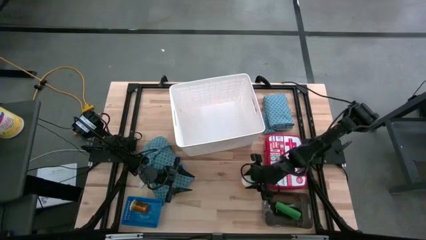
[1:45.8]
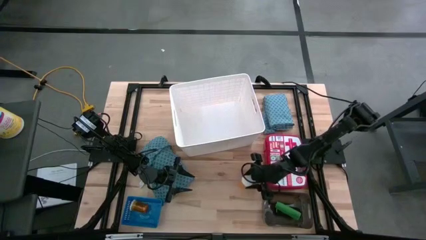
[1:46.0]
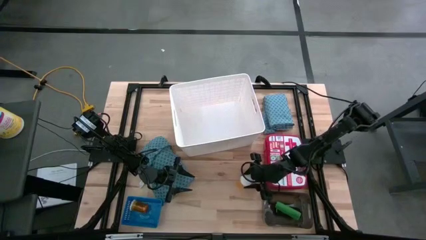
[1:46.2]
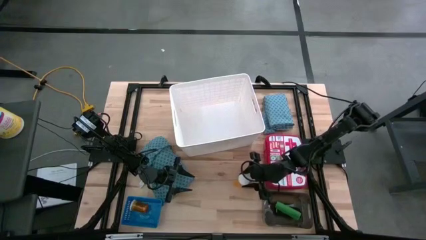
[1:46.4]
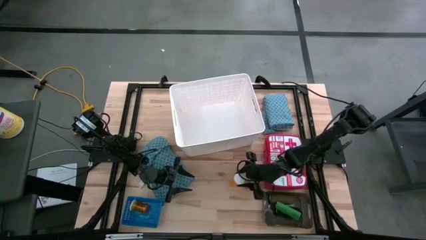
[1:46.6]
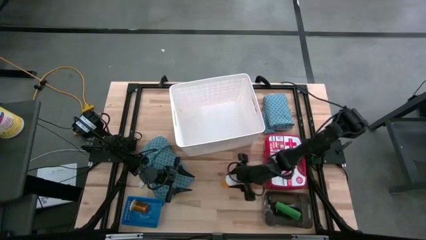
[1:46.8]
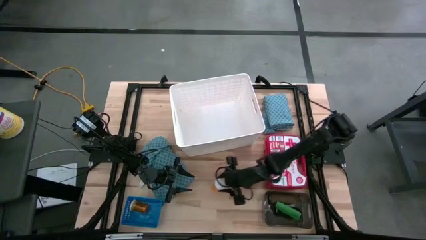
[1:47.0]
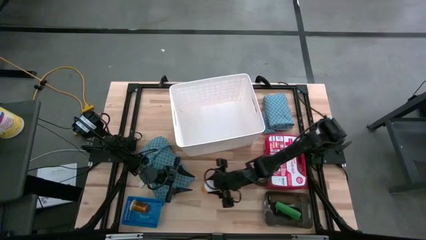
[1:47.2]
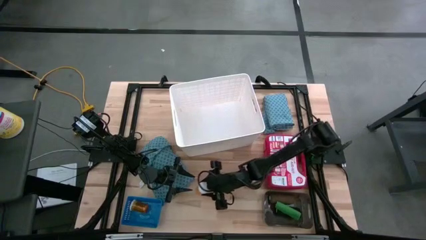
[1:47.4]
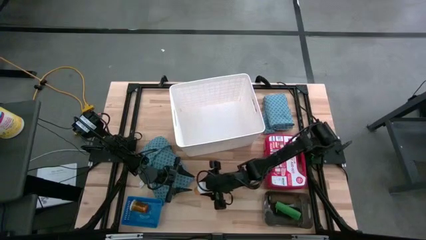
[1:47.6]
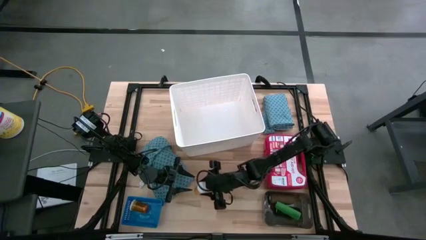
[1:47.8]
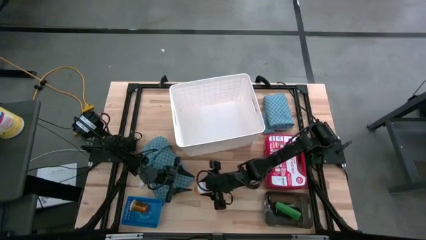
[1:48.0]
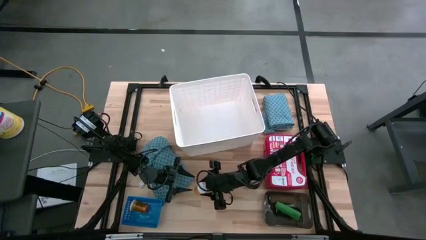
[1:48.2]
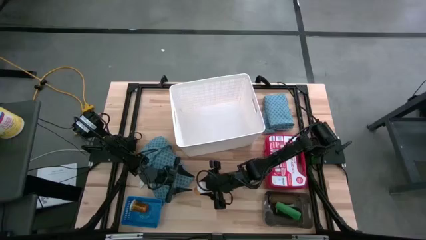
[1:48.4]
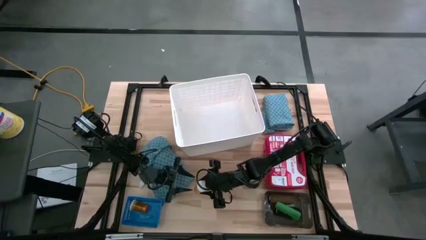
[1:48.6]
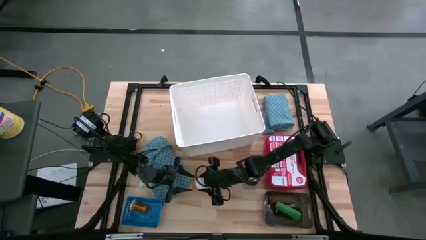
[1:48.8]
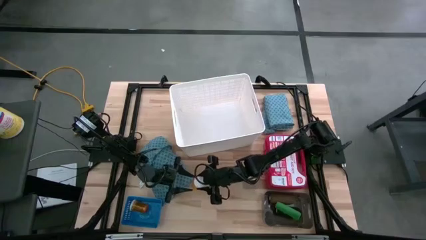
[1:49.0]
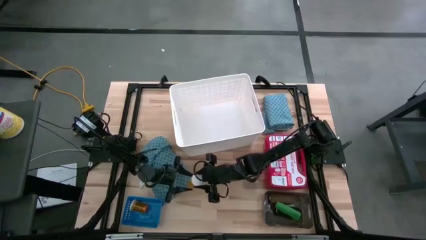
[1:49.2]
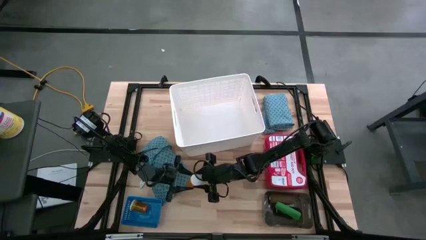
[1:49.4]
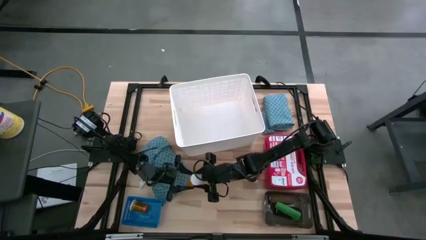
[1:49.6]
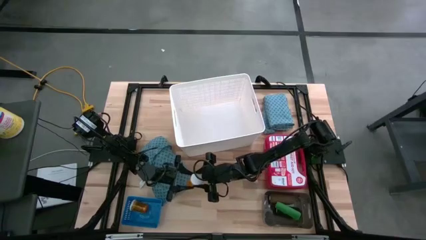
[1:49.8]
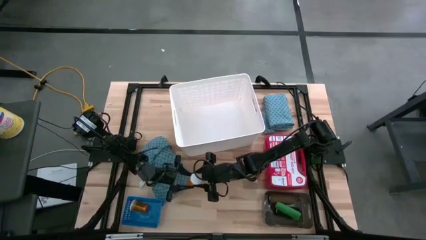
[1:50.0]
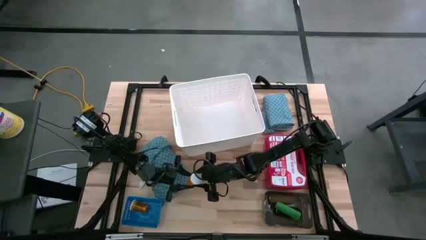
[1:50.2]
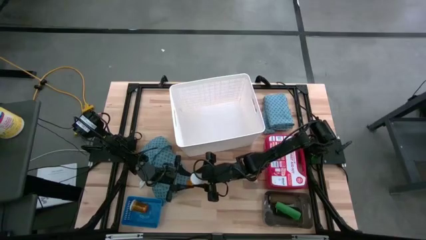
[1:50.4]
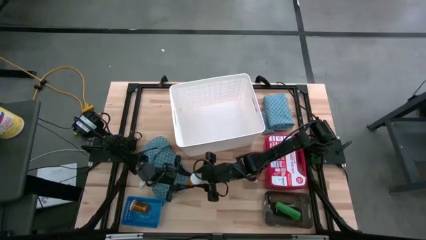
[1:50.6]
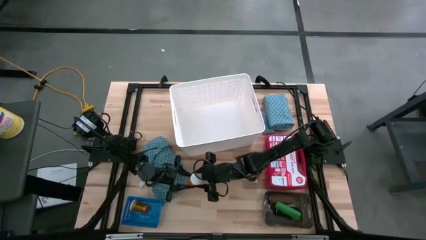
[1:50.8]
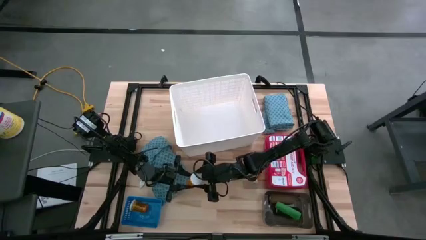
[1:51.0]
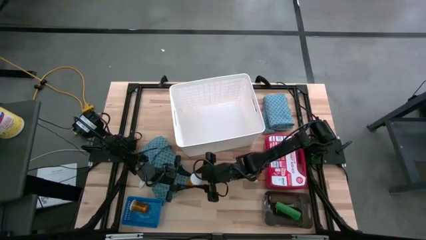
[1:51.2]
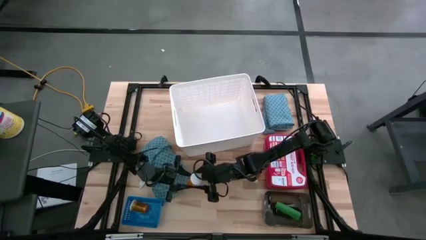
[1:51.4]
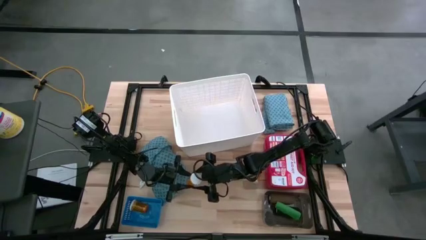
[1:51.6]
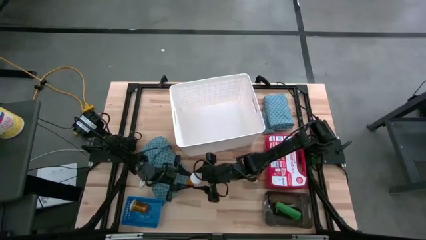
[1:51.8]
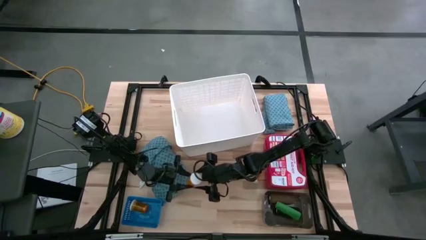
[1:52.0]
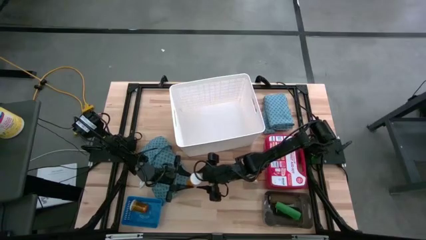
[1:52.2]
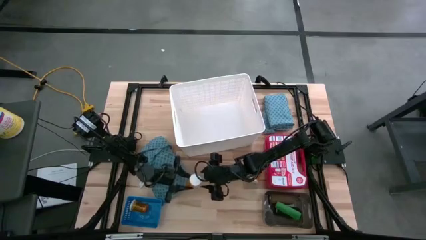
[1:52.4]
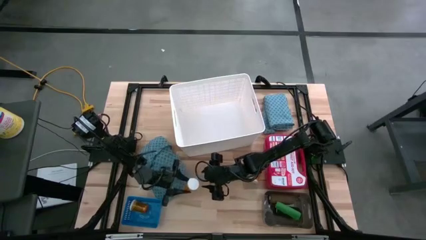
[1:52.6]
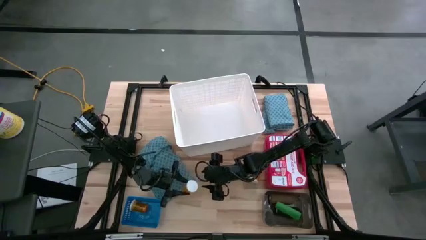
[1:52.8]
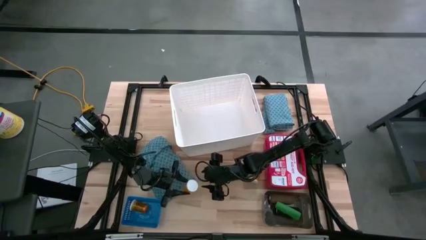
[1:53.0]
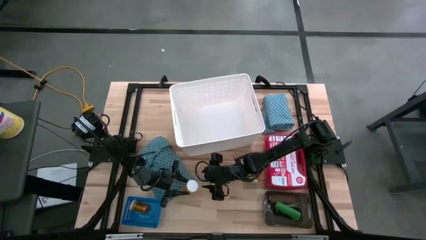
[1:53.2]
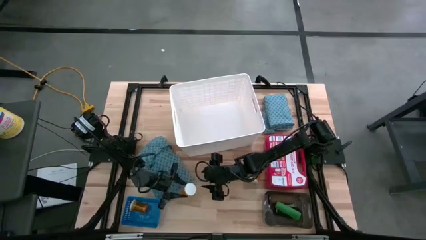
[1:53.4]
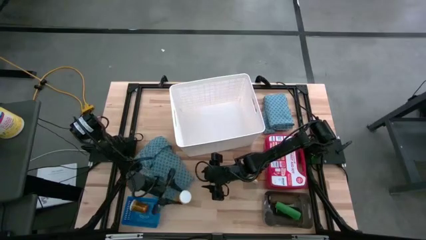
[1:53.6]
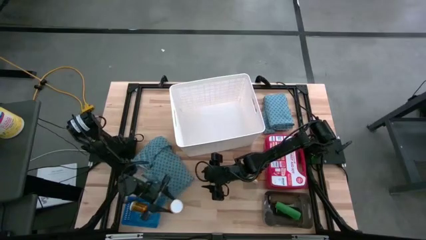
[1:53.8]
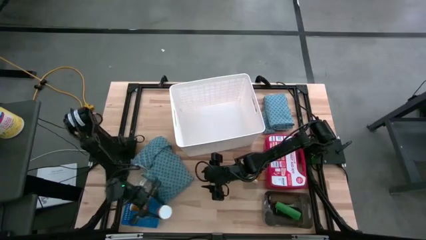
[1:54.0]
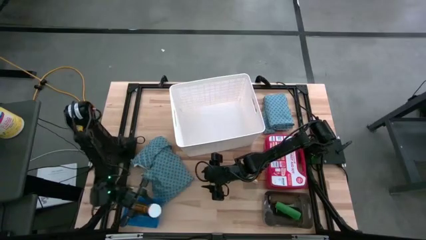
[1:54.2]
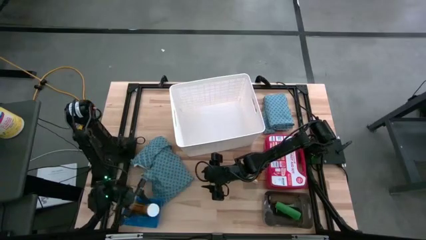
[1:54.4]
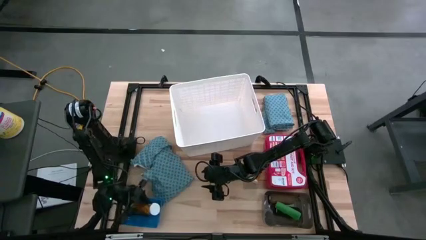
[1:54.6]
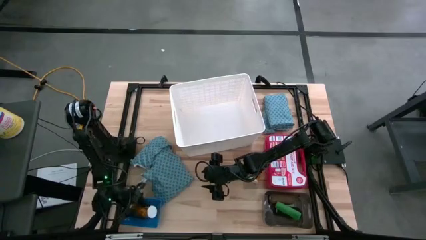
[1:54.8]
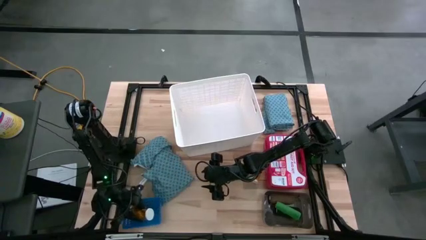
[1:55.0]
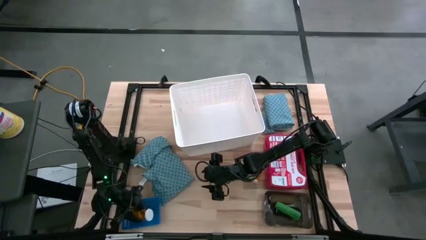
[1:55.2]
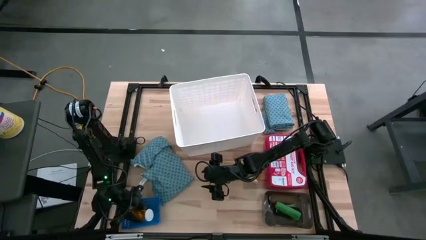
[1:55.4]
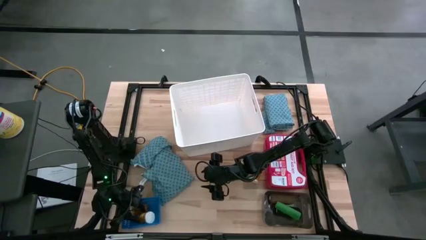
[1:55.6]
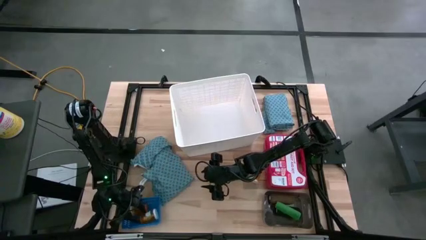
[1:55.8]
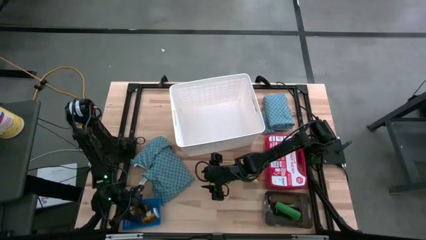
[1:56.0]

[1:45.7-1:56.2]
Task: Pick & place medical supplies in basket/bin
Put the bottom orange pill bottle into the blue bin

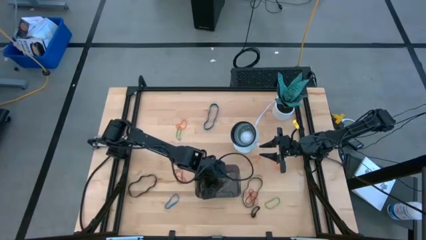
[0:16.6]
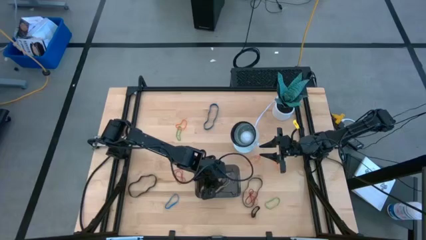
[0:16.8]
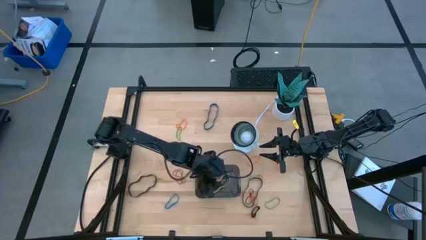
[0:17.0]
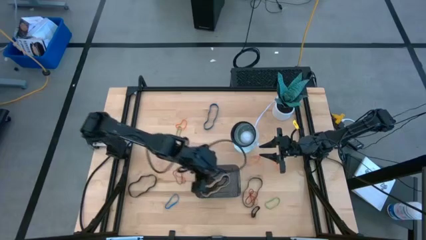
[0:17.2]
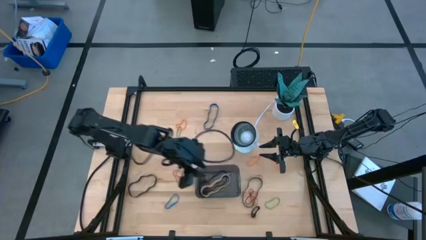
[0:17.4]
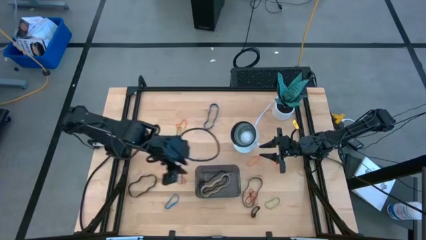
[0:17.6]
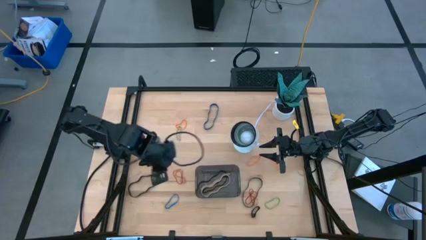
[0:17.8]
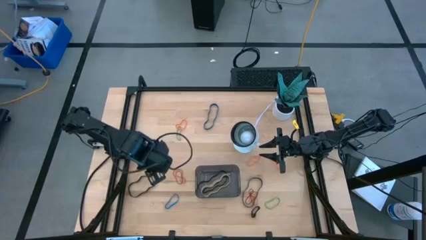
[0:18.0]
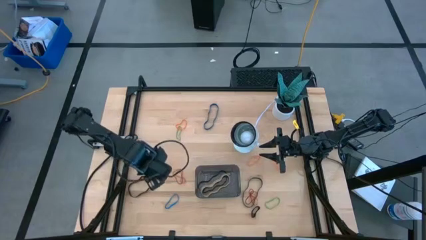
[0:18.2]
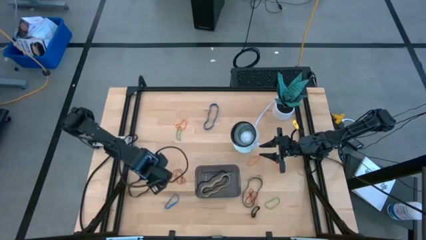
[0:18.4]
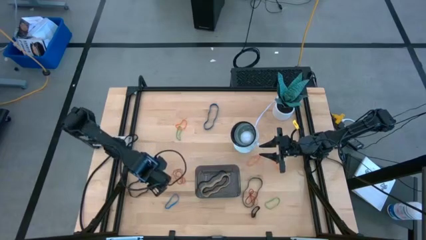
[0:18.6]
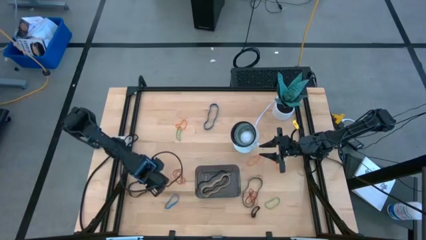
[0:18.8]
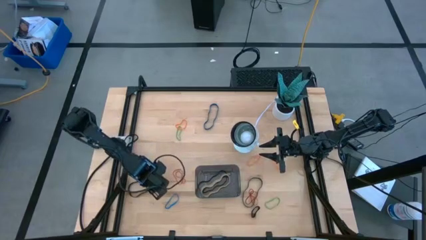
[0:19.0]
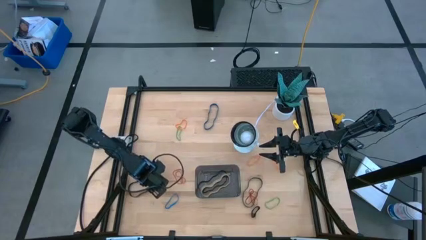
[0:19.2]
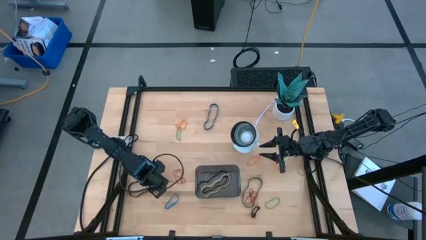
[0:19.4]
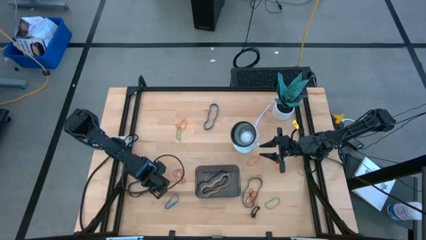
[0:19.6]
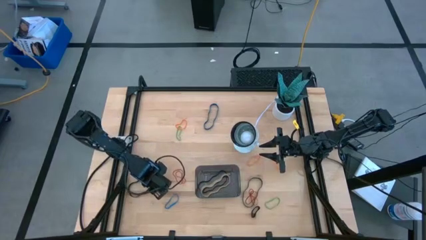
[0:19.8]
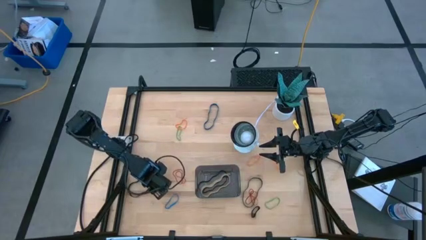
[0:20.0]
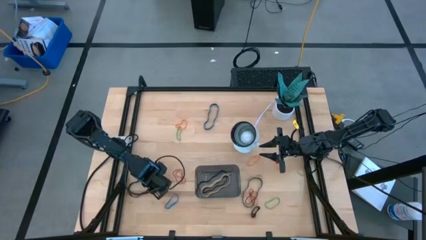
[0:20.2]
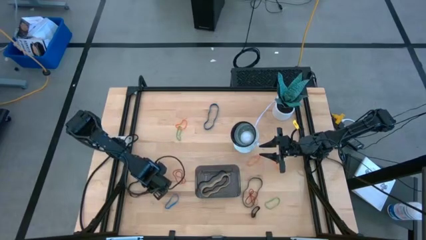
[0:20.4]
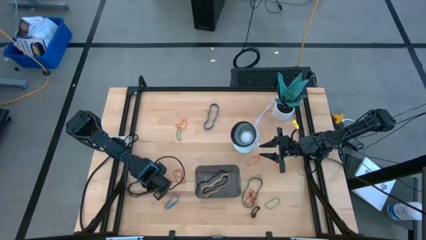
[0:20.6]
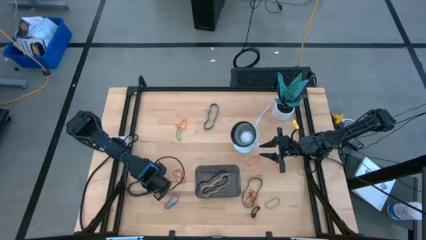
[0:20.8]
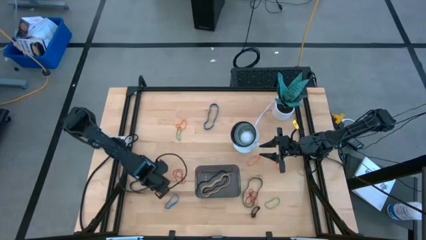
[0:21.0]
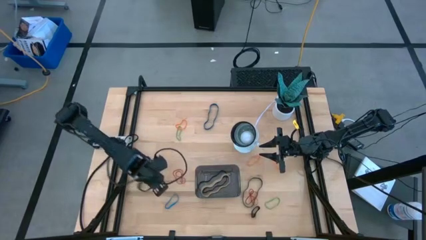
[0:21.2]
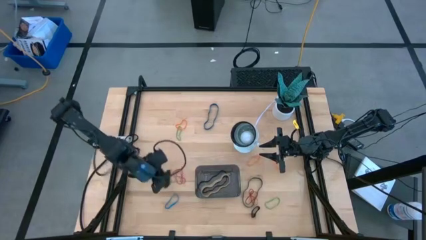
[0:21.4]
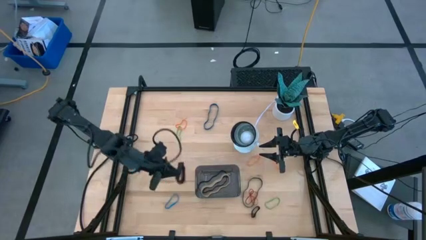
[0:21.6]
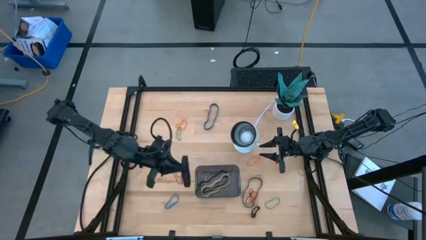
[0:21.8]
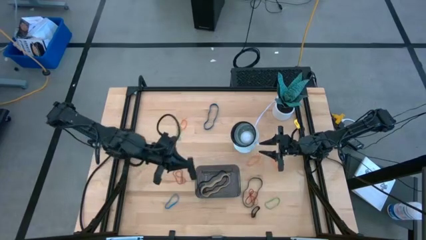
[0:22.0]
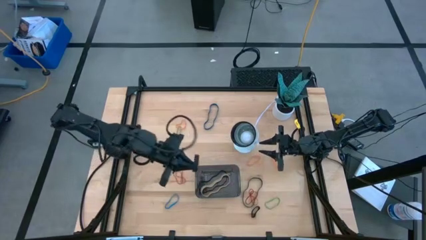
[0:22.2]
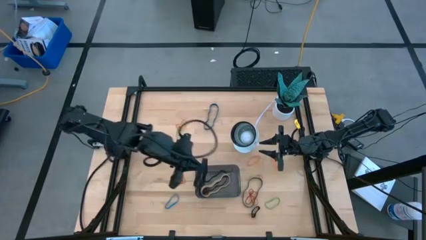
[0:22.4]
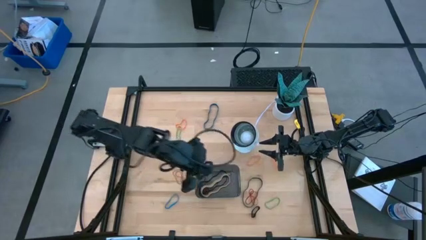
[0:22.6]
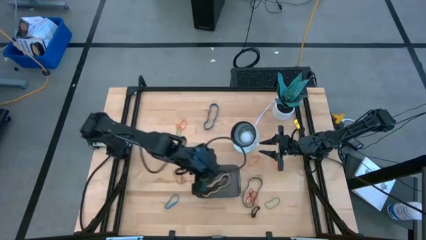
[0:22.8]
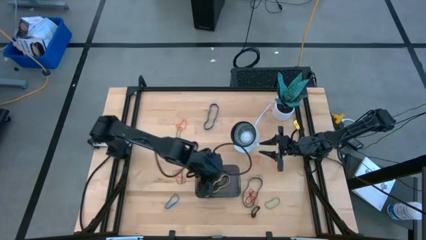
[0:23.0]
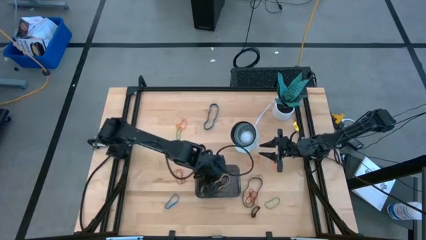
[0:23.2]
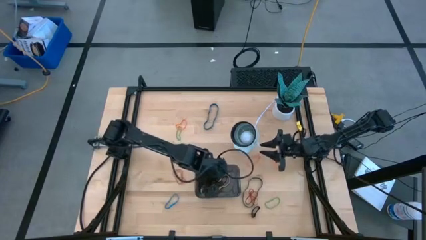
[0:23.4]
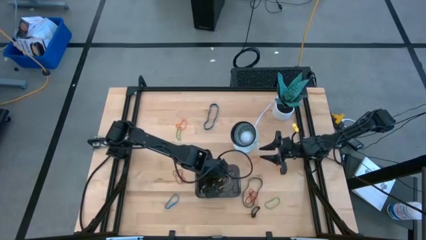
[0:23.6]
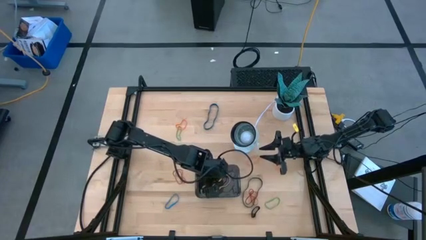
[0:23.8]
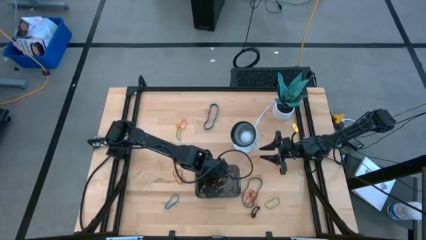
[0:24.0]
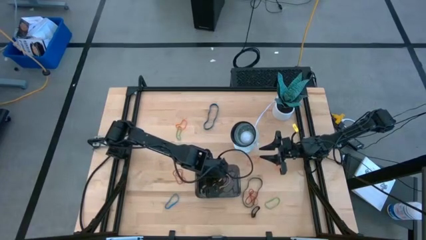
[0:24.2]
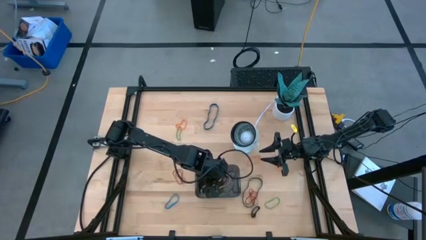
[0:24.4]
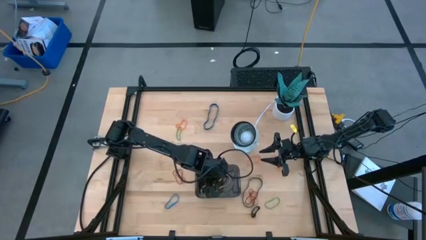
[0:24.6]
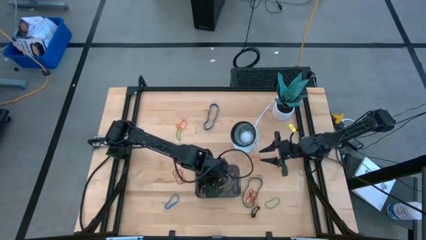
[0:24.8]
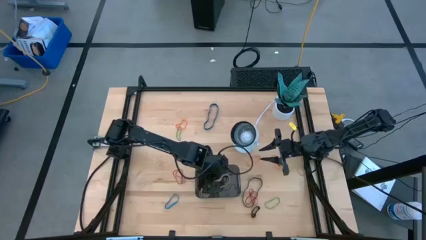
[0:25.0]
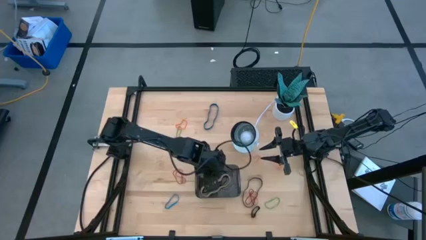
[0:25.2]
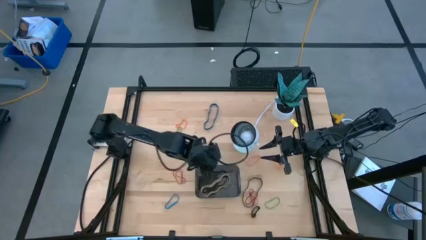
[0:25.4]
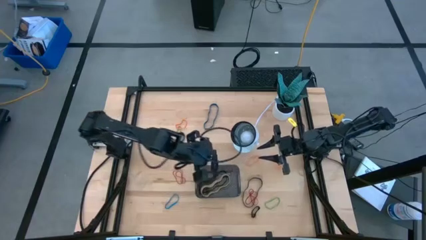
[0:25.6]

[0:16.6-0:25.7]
Task: Pick and place rubber bands into bin
Put the left large black rubber band into the black bin
